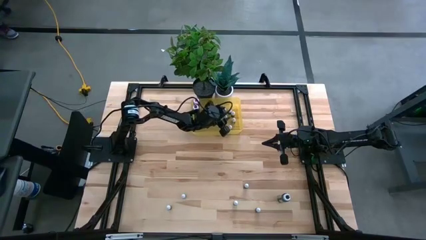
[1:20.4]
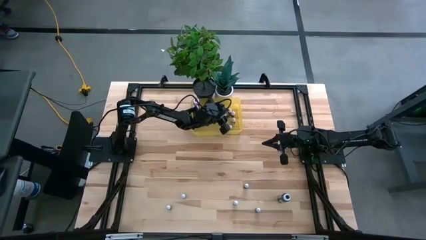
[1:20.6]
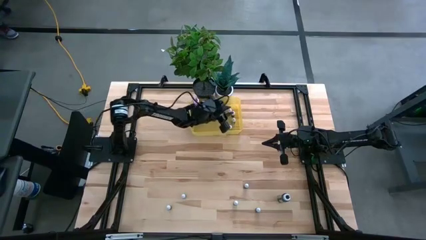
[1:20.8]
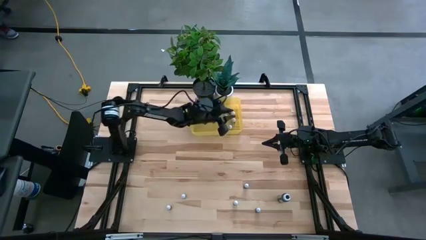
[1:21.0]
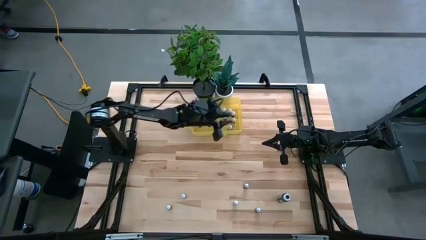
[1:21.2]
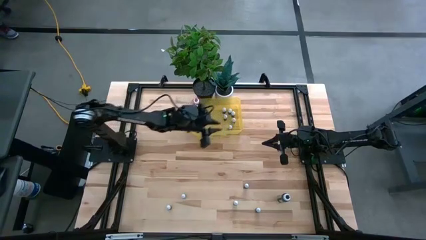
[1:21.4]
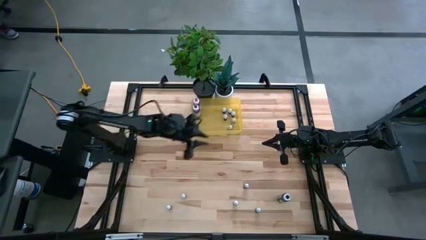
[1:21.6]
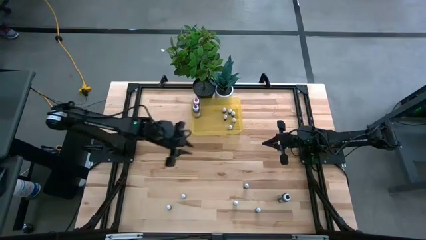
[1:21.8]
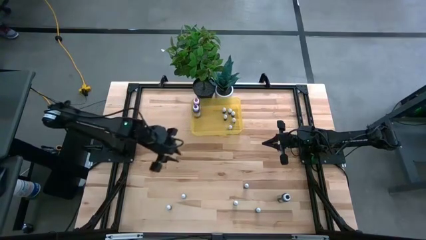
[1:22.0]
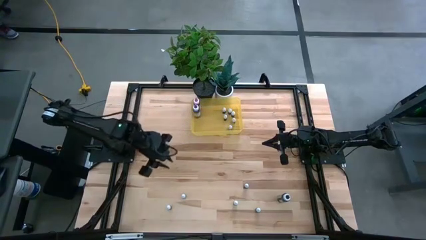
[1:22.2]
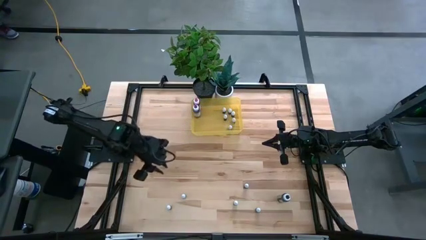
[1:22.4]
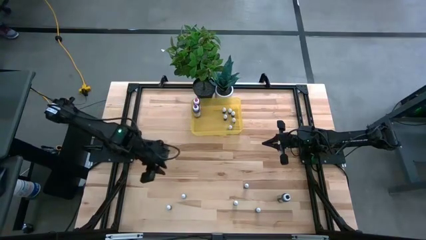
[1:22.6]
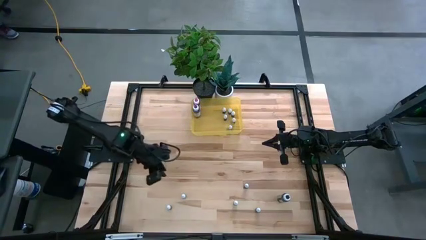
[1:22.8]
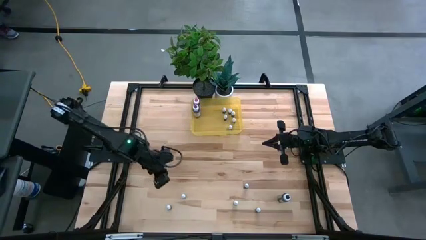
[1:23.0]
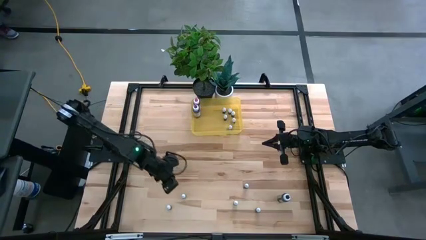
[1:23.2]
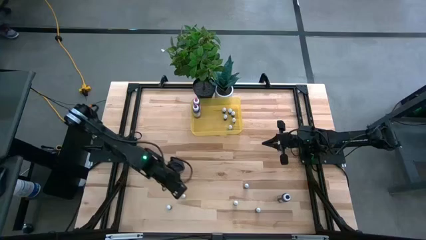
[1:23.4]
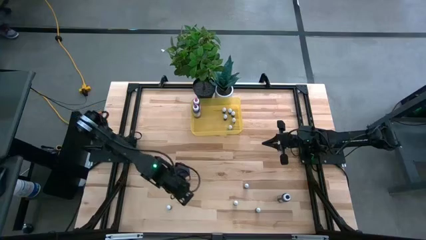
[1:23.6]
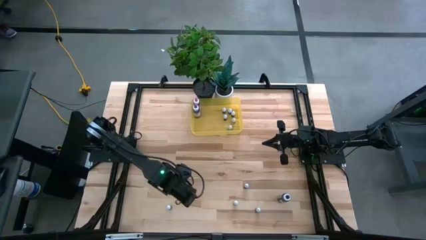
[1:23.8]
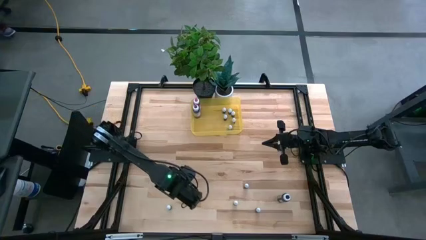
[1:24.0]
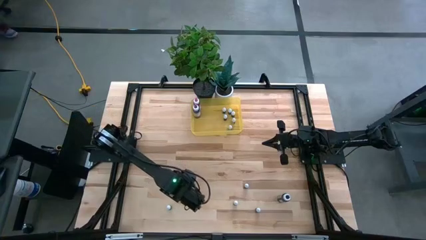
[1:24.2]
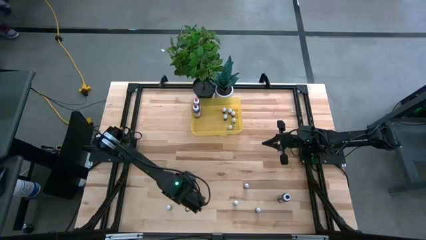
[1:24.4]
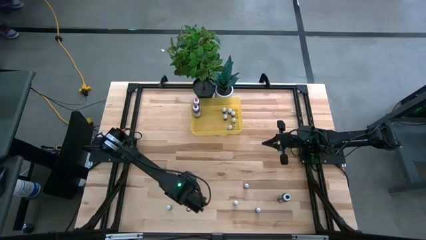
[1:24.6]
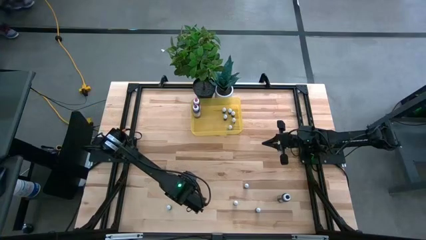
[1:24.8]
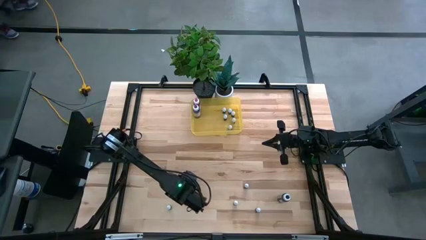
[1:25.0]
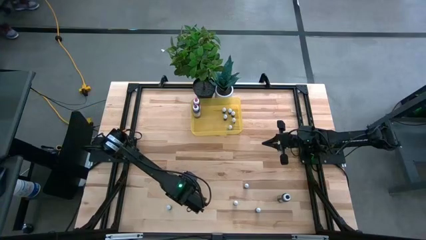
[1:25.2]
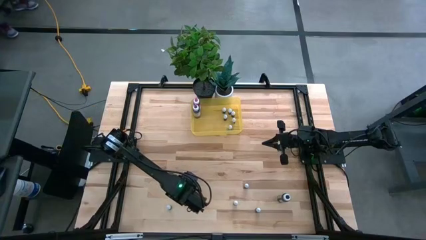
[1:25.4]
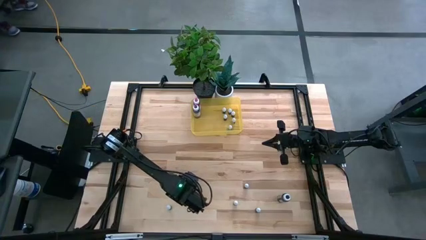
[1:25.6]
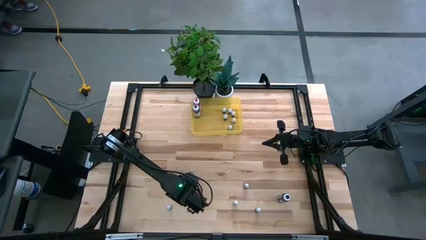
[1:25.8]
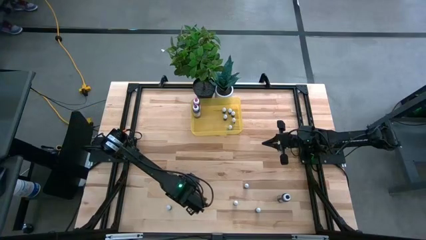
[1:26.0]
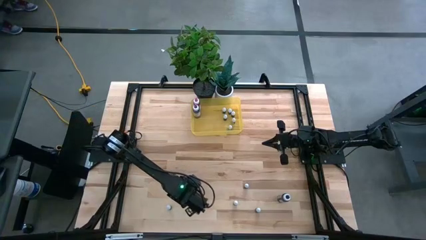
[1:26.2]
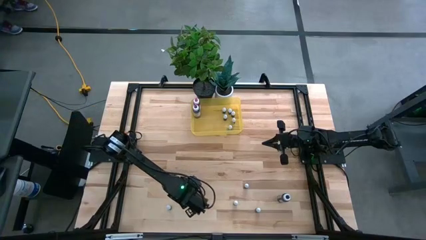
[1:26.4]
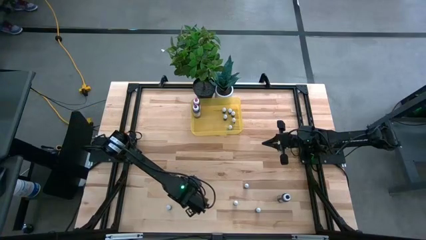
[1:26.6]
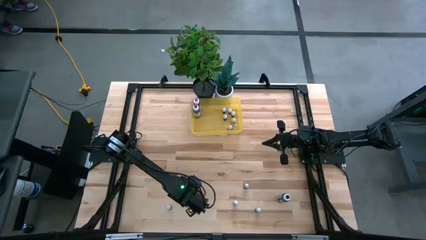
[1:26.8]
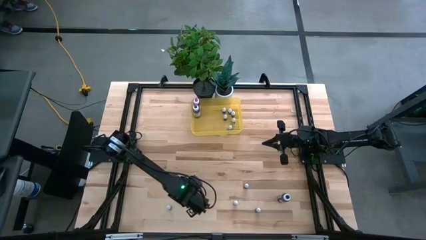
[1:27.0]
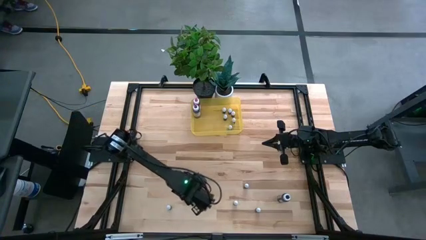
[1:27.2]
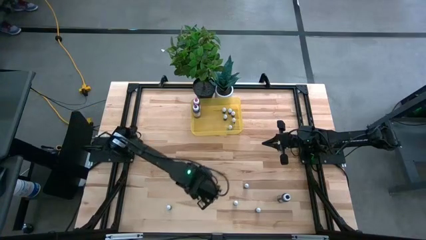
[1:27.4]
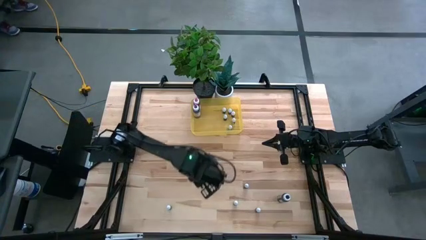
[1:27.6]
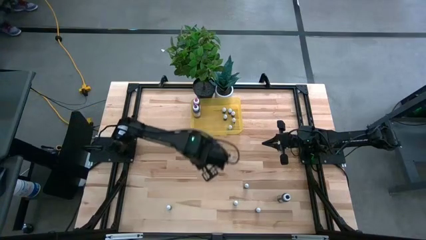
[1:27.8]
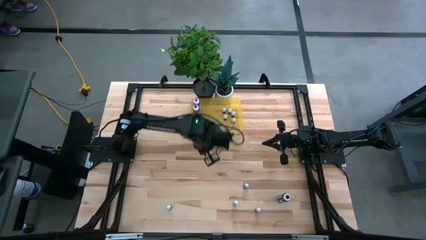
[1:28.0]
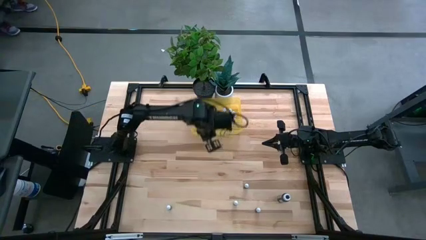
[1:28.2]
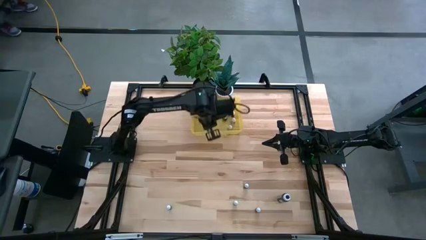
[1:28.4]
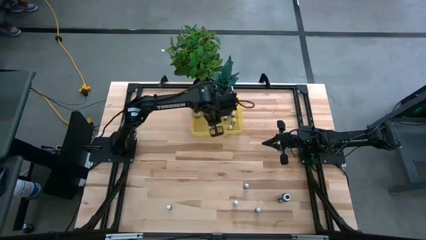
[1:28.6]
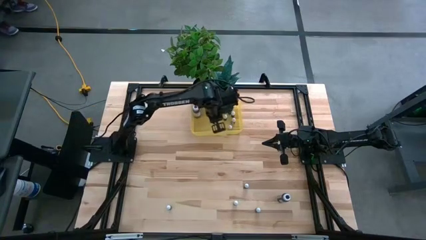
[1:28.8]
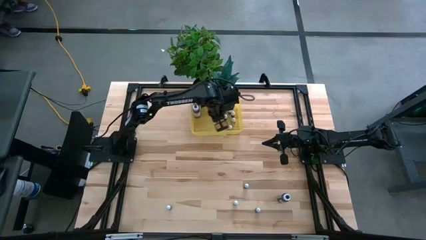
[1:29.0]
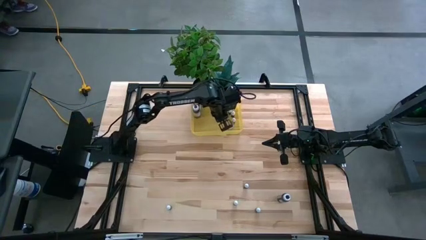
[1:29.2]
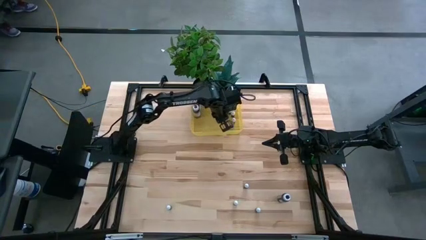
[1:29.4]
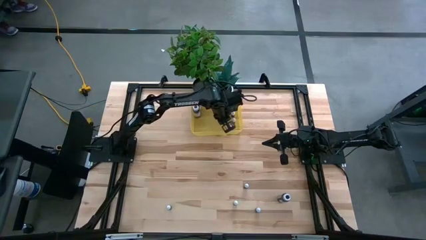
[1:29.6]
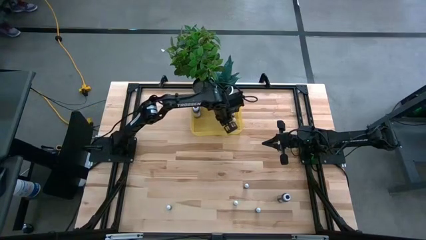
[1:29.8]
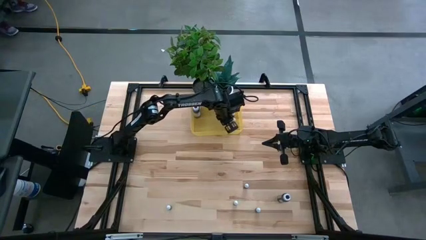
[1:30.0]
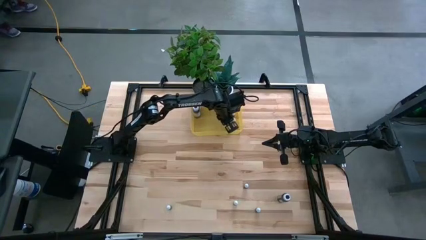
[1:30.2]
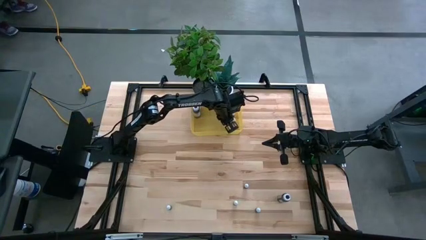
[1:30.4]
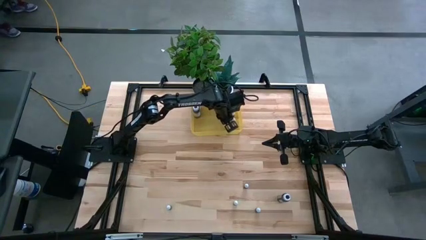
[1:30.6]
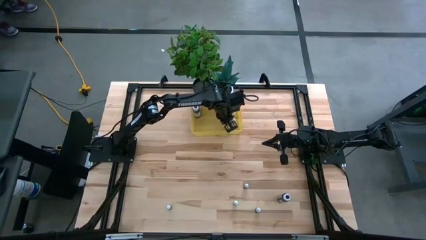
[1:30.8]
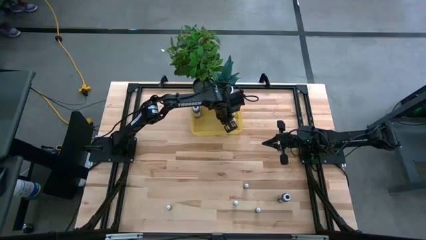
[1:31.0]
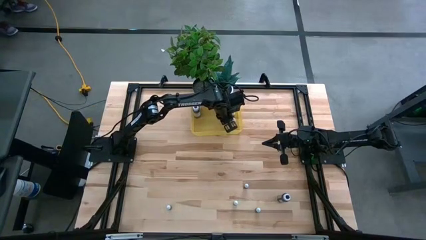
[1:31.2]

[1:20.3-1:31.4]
Task: Pick & Place food coloring
Put the small black food coloring bottle into the yellow bin

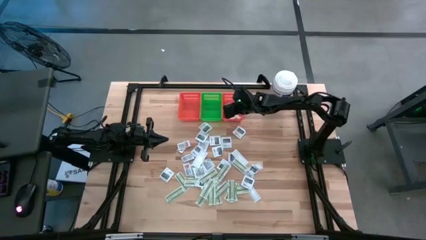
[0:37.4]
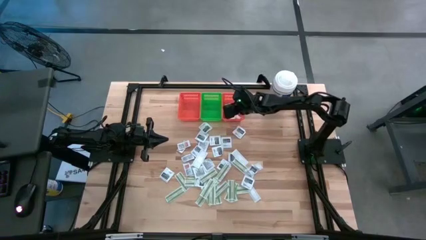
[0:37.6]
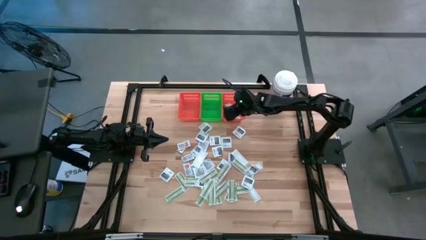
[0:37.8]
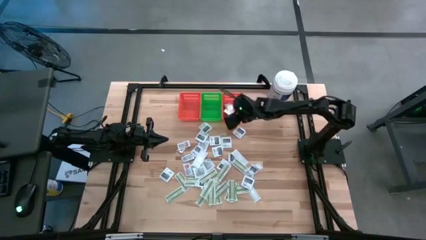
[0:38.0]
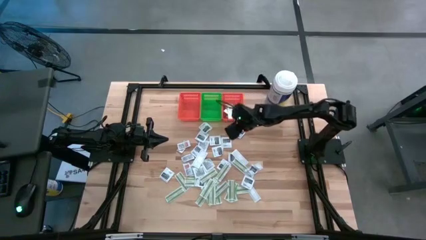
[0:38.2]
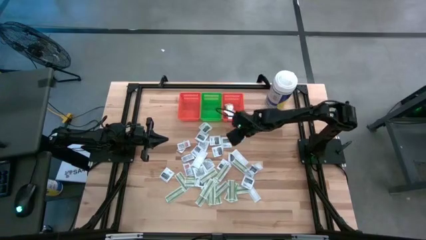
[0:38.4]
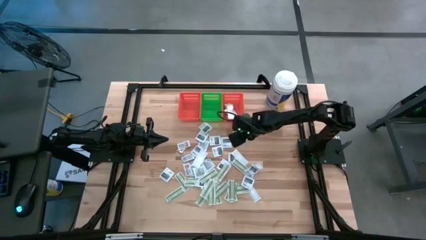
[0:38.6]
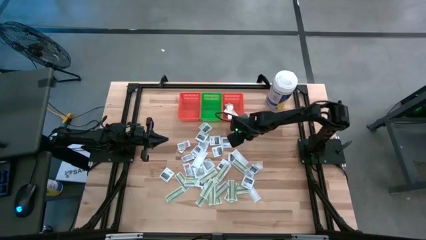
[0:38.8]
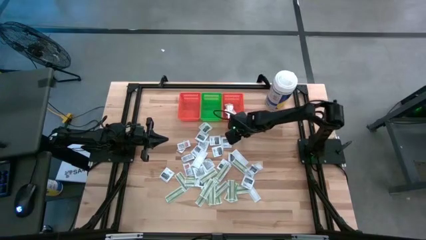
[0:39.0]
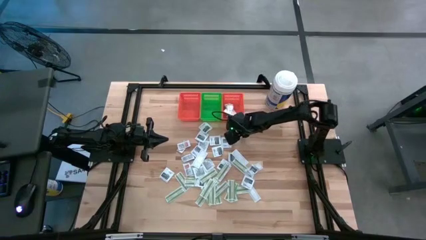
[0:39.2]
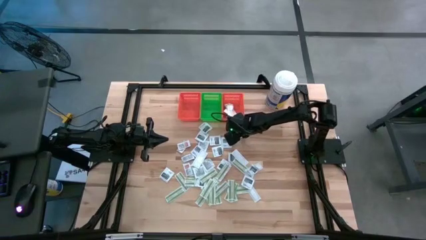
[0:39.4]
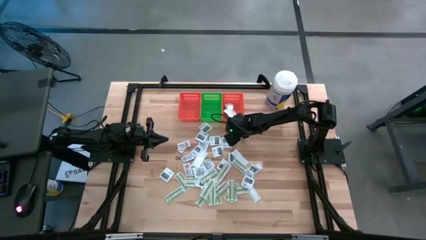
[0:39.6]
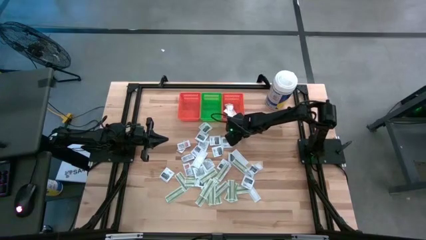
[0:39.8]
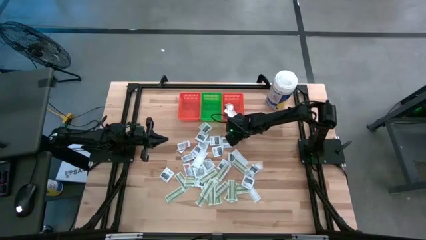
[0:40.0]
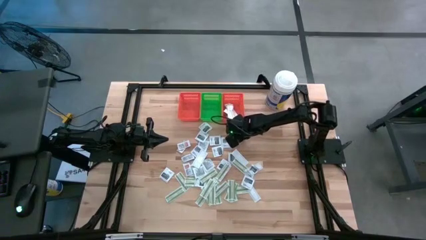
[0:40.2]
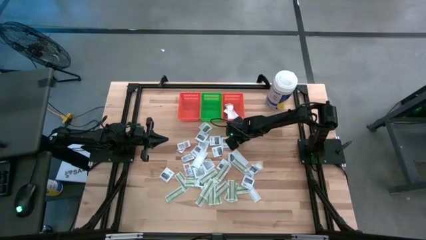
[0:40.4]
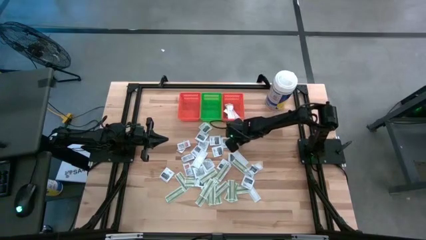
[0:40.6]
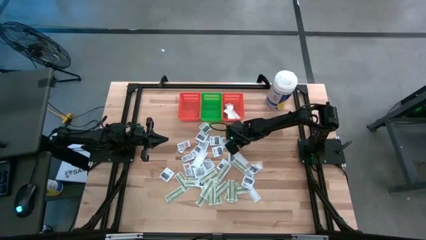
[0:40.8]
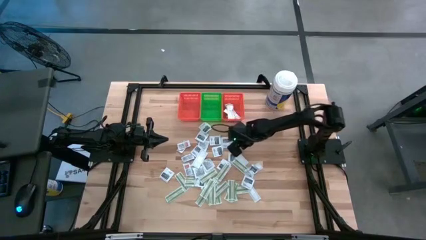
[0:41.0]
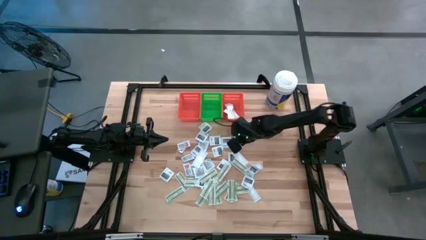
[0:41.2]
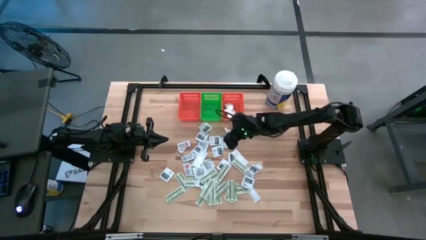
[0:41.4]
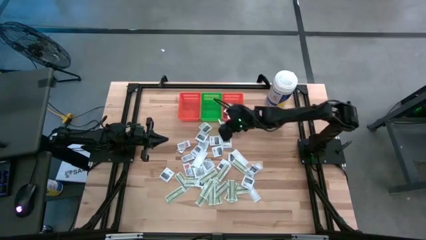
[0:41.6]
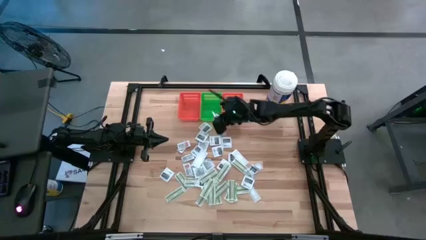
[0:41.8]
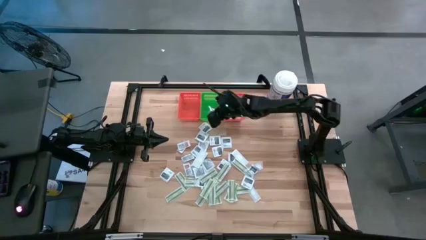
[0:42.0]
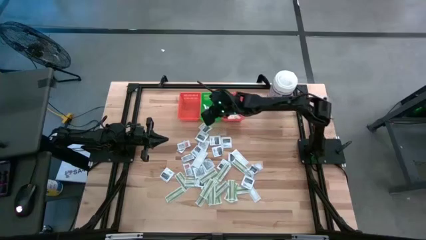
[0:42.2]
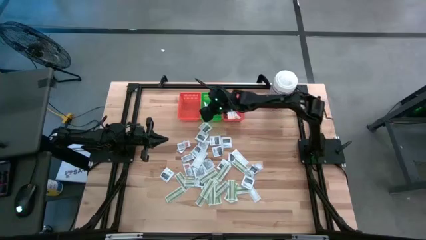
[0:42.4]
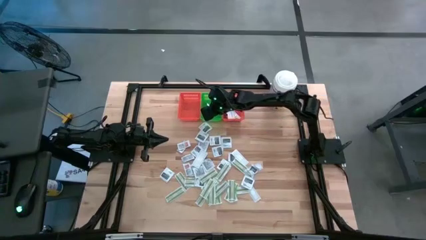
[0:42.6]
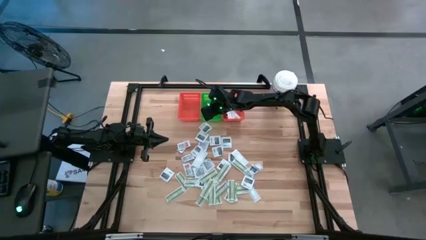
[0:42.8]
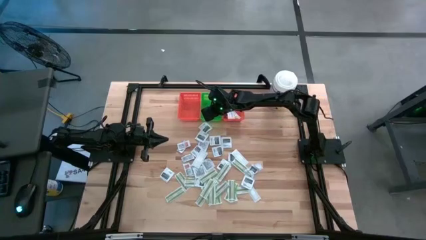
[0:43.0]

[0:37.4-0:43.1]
Task: Pick & Place First Aid Supplies
Put the towelette pack into the green bin
